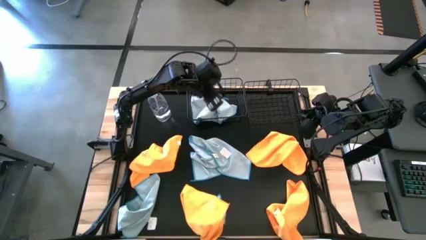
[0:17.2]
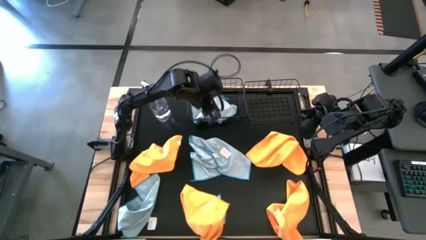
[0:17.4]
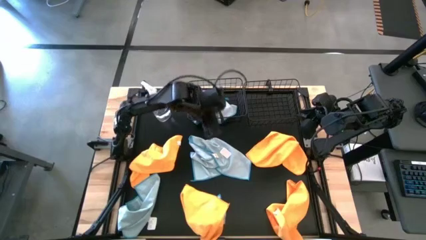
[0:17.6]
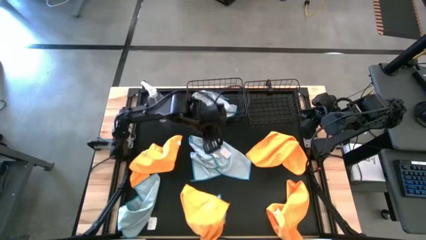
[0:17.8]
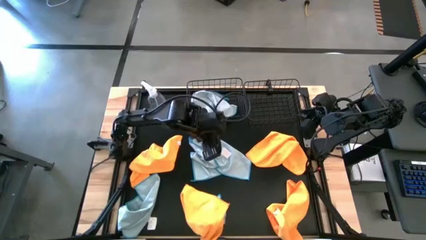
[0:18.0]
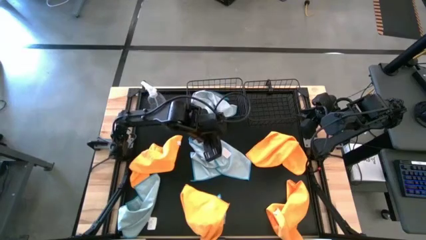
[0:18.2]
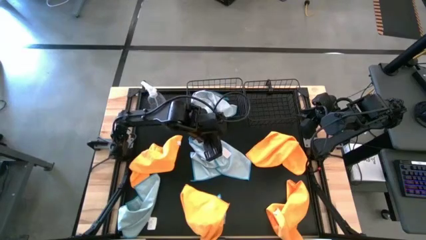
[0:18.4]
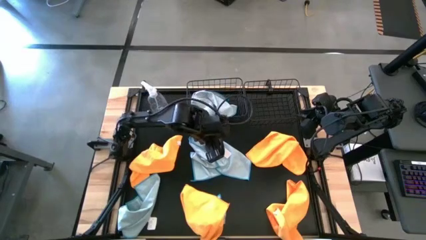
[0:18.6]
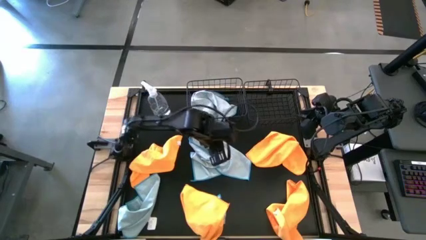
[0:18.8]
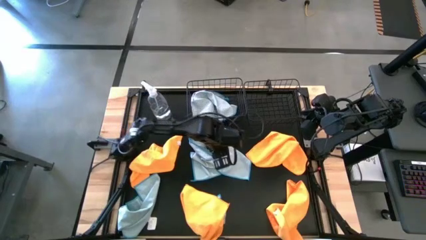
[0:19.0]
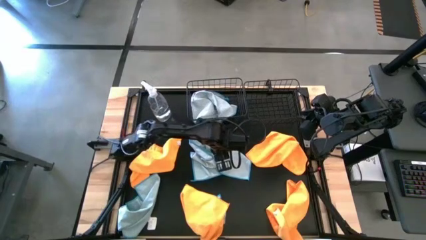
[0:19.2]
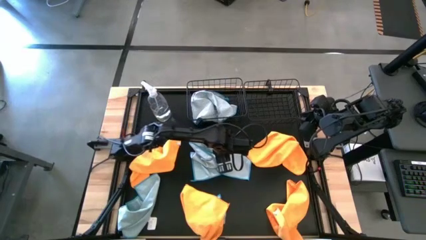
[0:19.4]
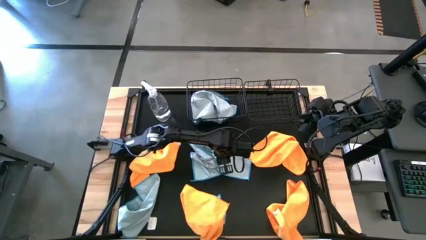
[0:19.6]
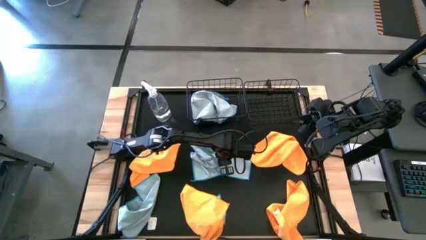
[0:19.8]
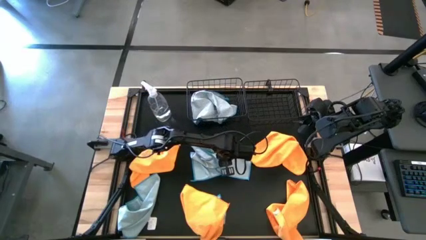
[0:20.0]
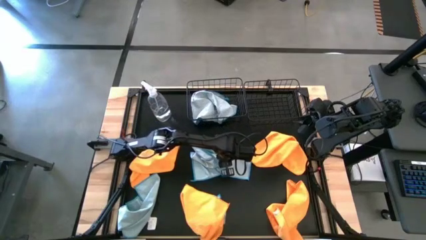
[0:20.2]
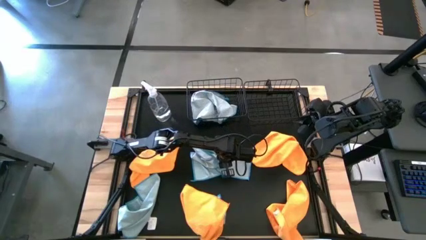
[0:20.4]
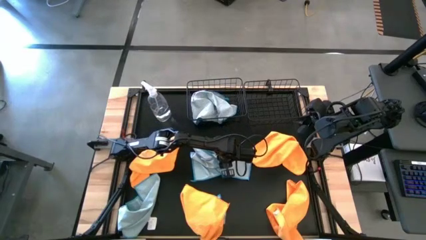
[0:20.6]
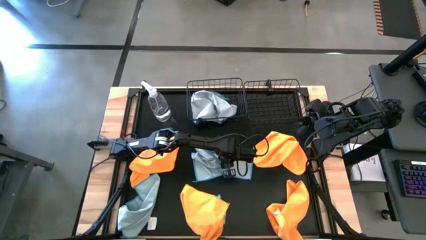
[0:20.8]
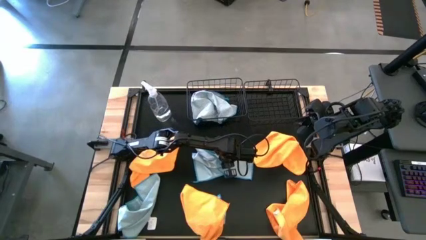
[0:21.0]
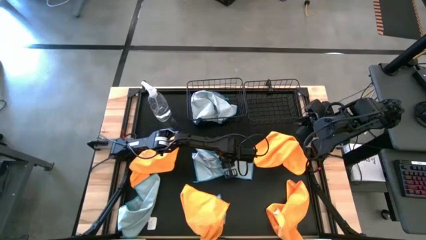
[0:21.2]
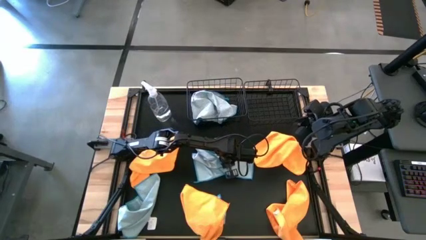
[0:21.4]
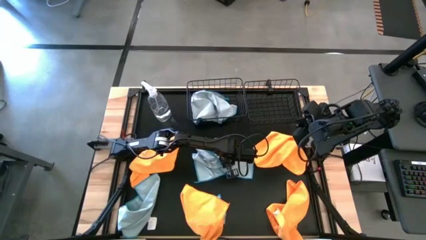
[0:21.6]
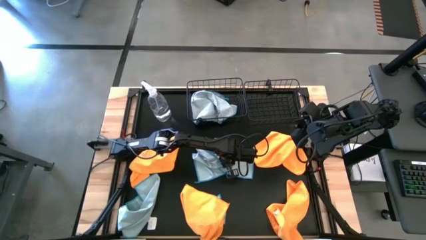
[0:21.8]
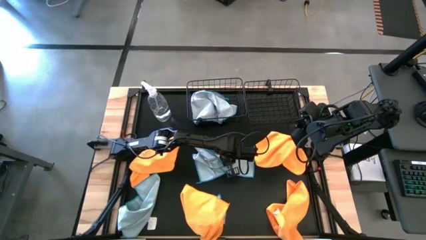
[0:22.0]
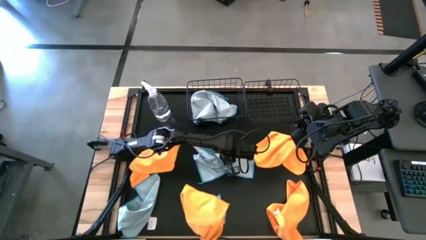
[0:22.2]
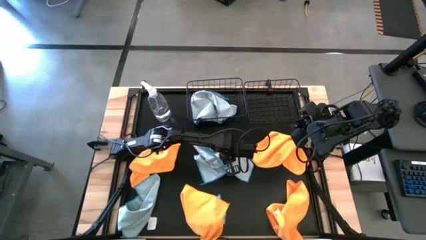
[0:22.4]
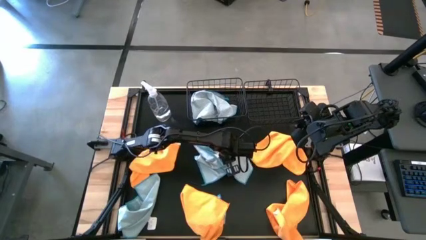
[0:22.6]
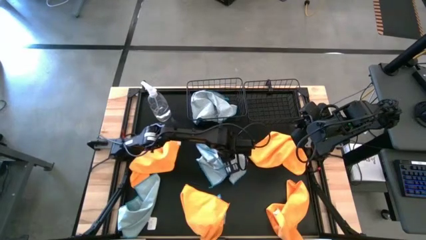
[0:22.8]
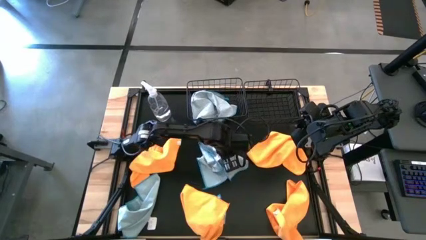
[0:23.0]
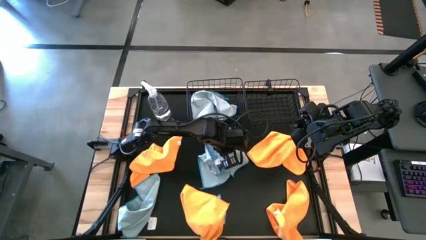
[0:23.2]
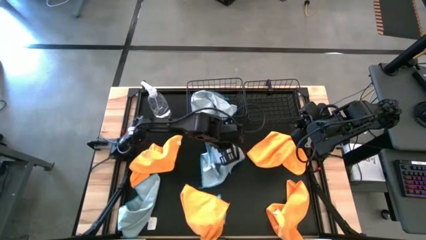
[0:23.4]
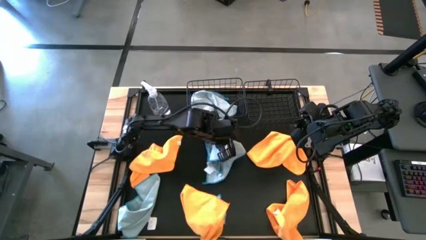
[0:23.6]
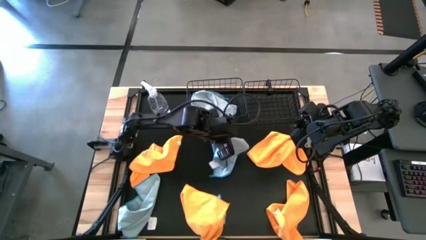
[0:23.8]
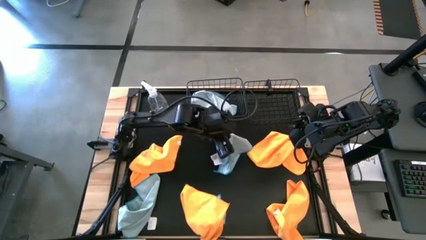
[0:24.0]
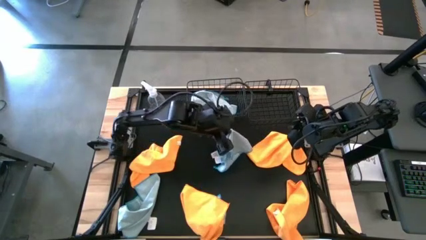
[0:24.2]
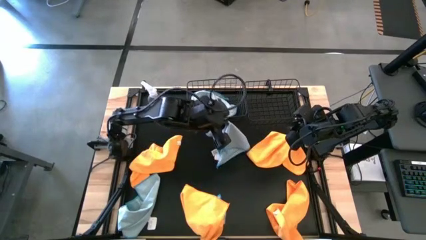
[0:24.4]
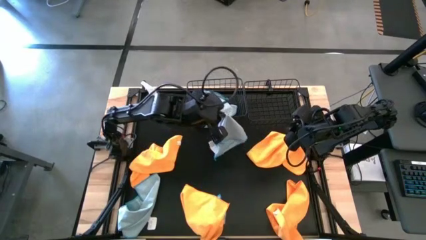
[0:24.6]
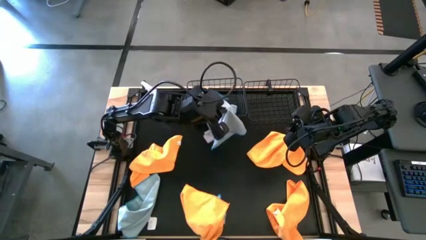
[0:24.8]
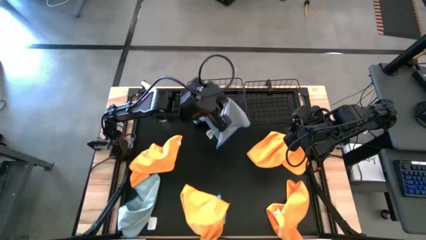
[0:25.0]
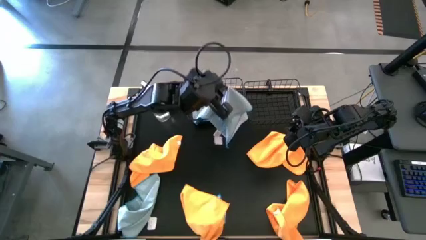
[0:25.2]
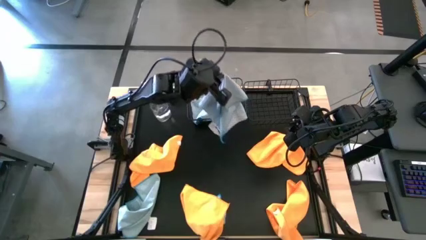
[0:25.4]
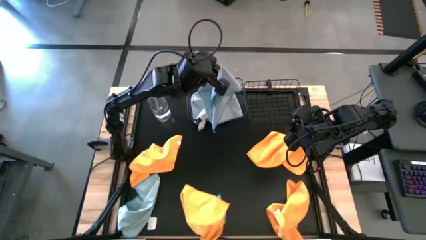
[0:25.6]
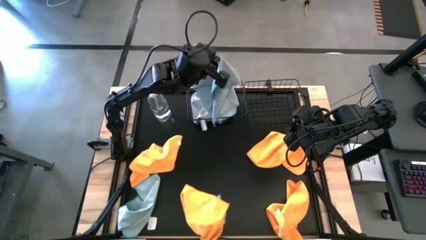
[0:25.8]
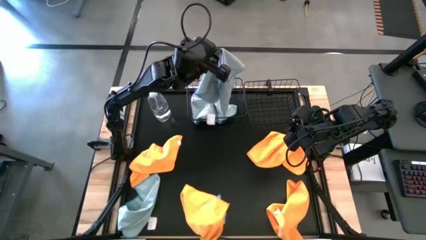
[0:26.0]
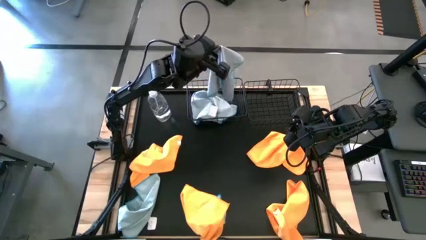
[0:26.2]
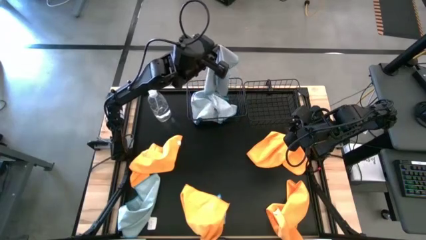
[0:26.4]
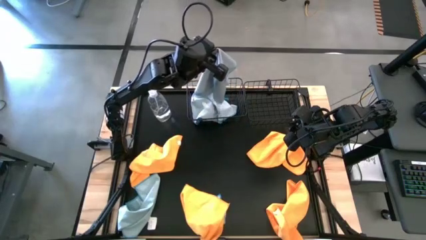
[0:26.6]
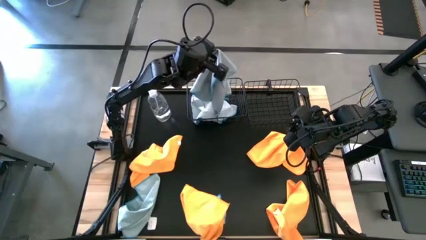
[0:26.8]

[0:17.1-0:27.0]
Task: Sort microfiber towel by color & place in baskets
Put the top blue microfiber towel into the left black wire basket

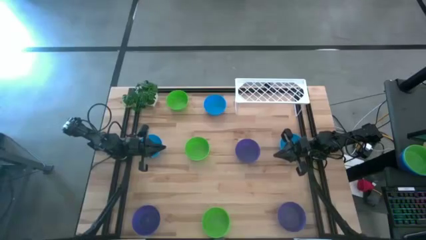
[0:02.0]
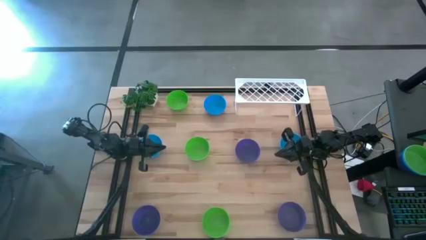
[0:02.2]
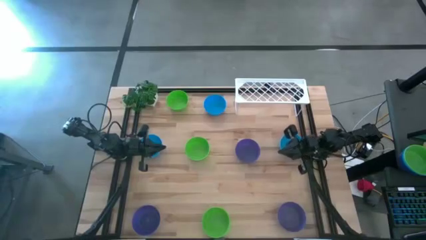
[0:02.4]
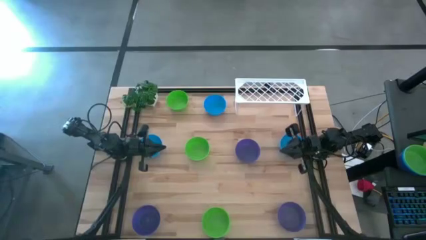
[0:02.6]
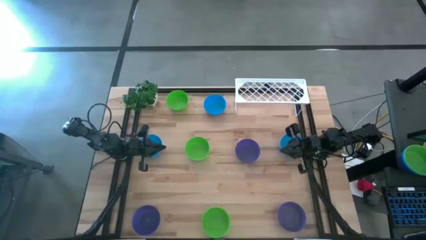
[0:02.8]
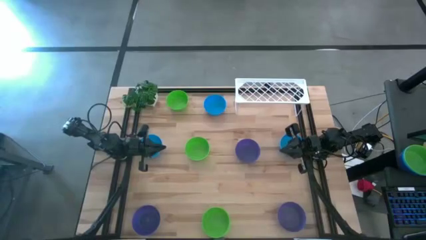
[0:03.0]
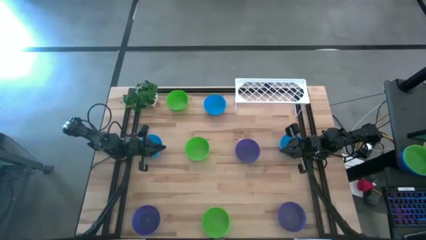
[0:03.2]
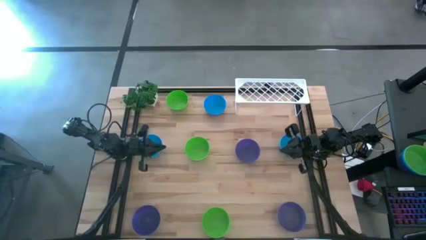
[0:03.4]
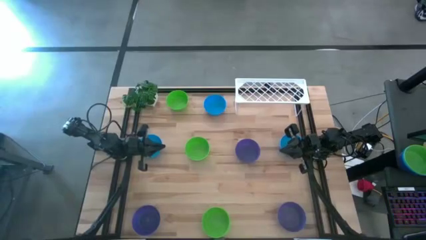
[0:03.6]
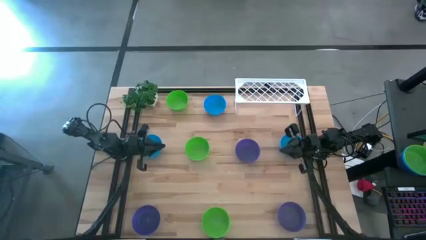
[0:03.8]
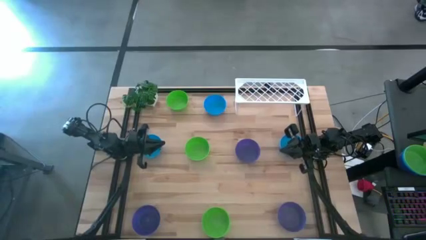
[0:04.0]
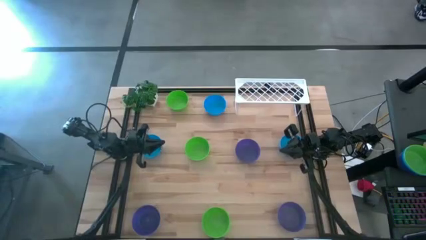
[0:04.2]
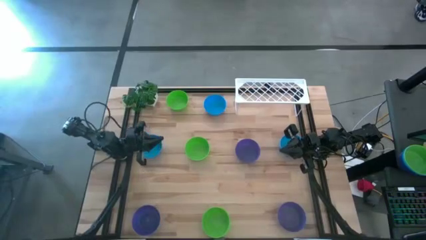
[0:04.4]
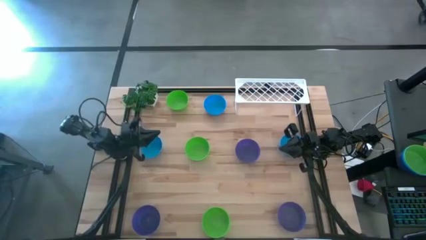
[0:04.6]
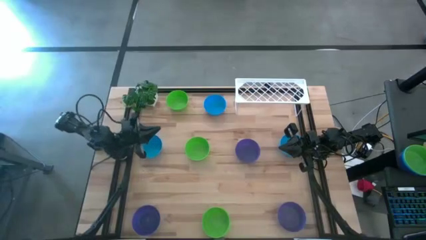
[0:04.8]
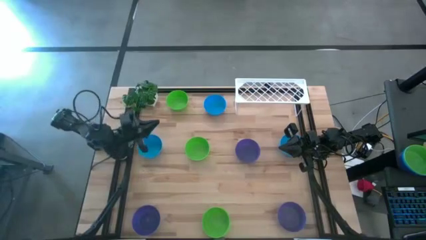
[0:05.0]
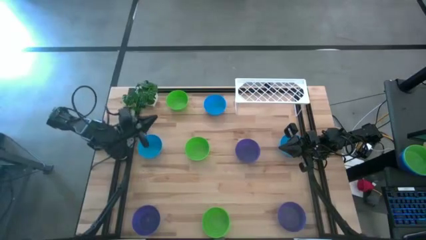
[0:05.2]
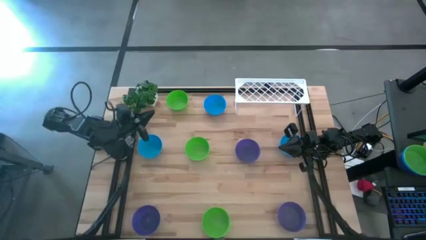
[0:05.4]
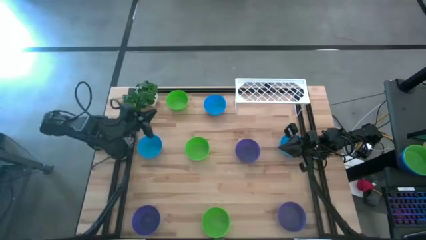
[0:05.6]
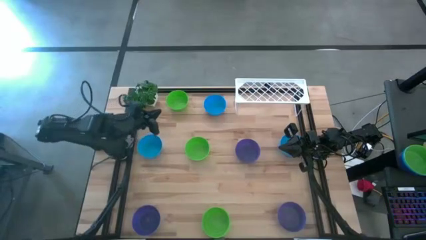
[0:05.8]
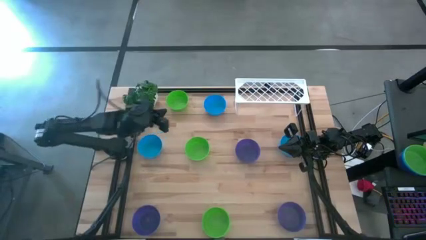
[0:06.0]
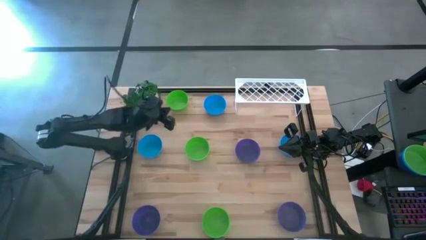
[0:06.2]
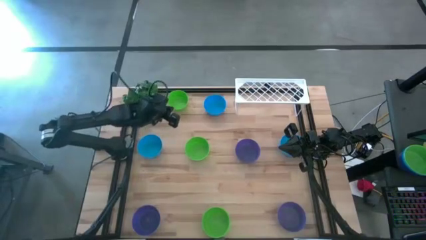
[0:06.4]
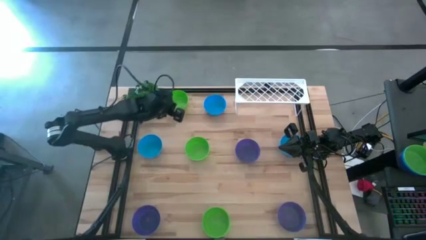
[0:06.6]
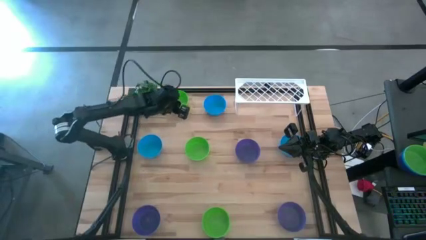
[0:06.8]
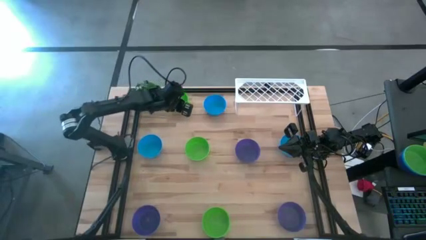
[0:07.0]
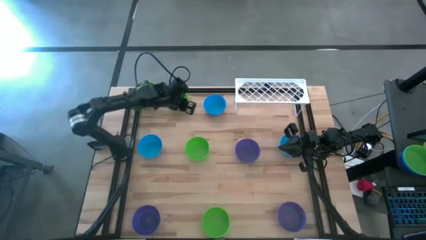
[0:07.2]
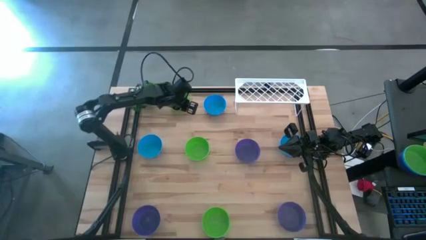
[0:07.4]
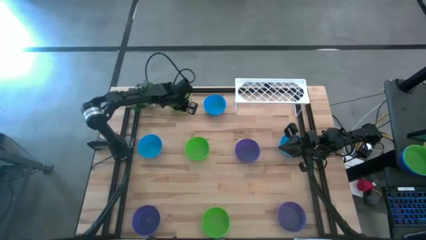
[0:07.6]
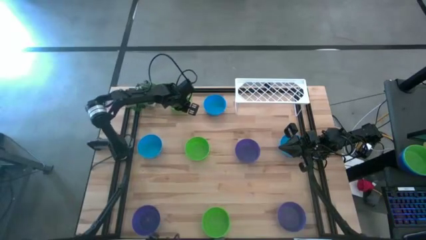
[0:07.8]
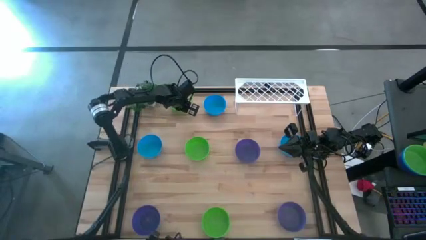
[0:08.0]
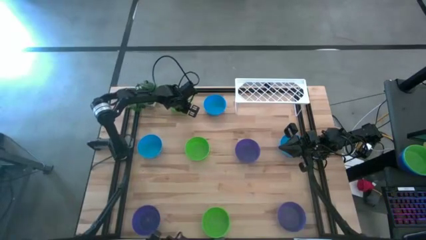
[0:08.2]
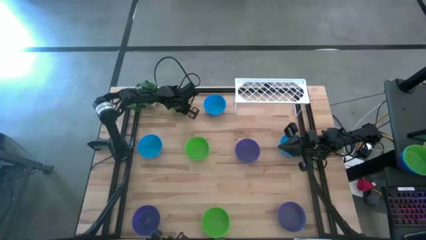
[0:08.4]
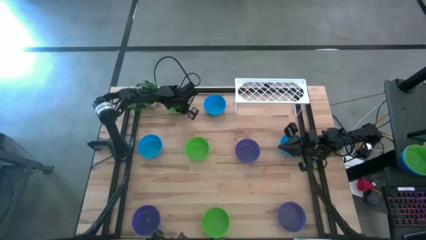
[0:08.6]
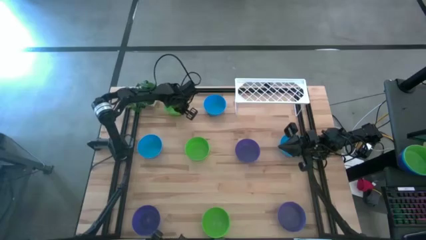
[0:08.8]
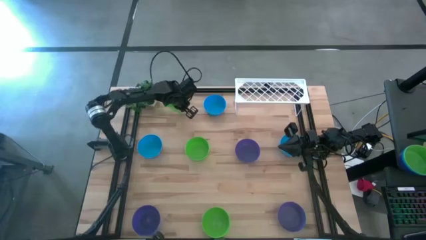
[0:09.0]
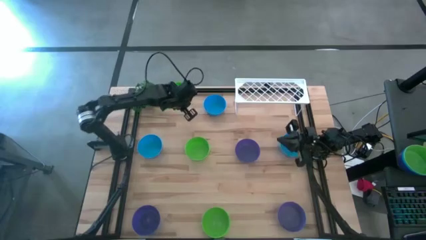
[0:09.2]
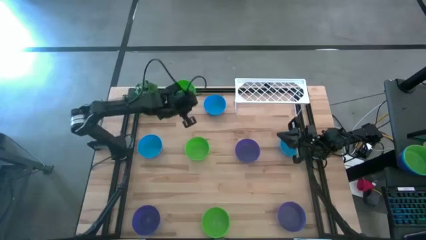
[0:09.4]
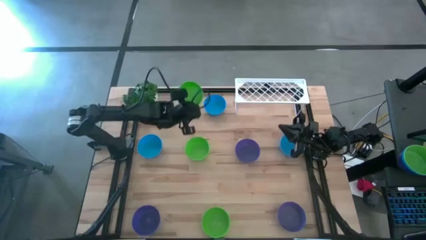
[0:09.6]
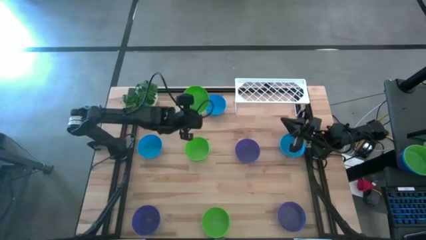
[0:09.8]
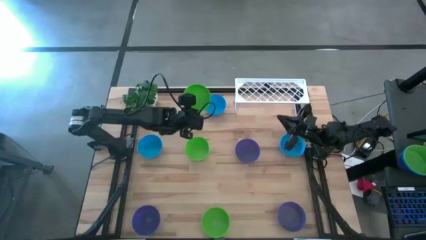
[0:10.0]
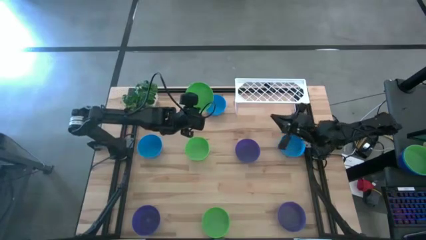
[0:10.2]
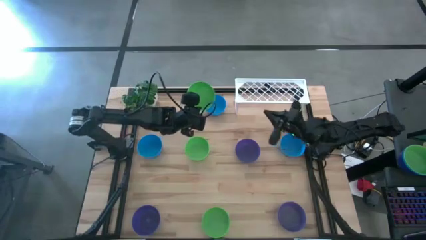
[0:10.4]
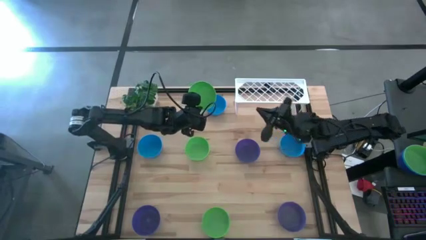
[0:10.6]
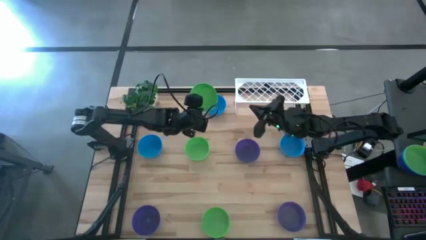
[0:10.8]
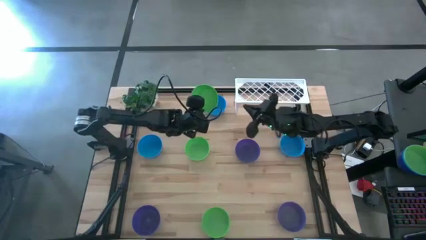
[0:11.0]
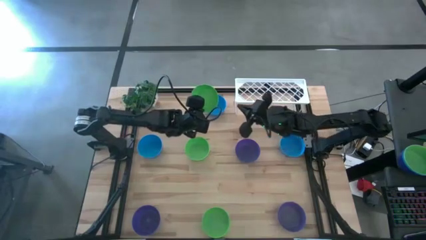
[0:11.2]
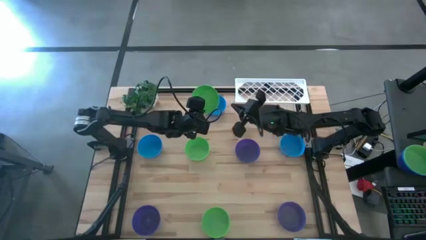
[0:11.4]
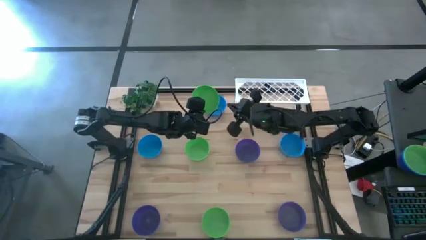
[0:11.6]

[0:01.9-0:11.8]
Task: Pick & Place Mini bowls
Put the top green bowl on the shelf
